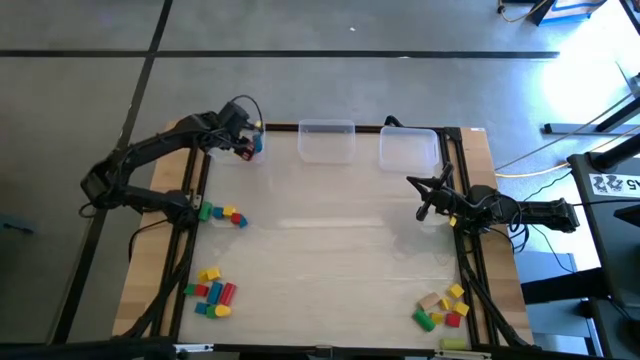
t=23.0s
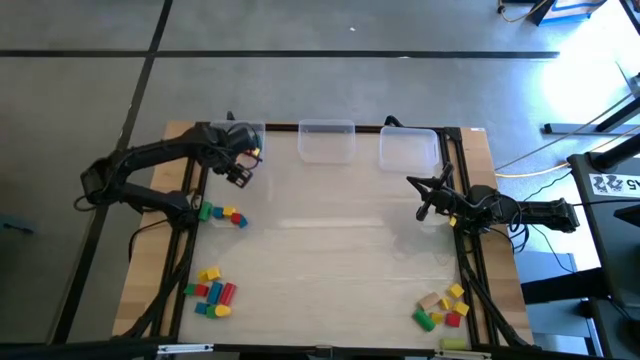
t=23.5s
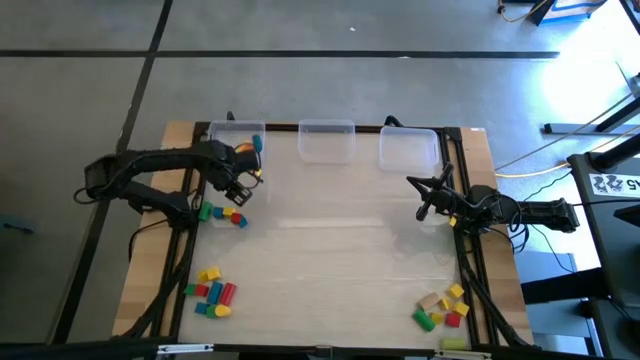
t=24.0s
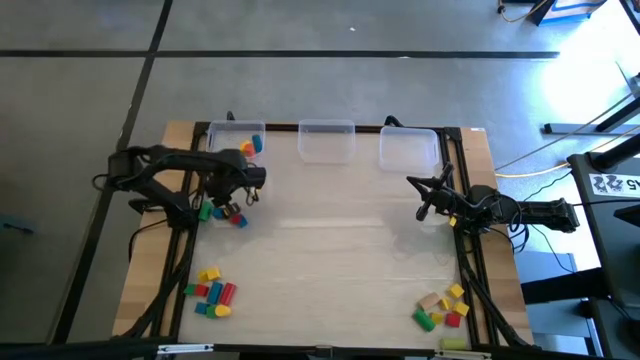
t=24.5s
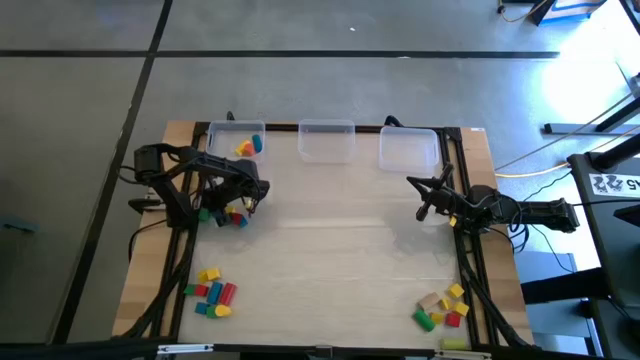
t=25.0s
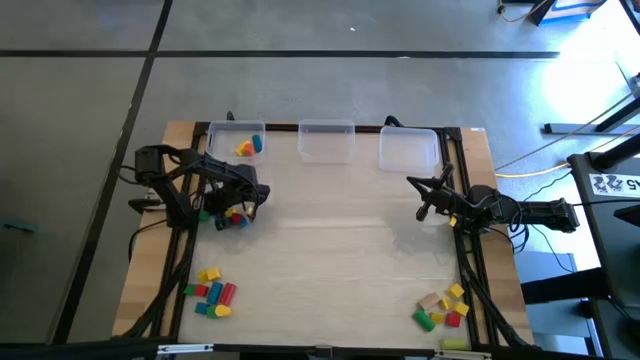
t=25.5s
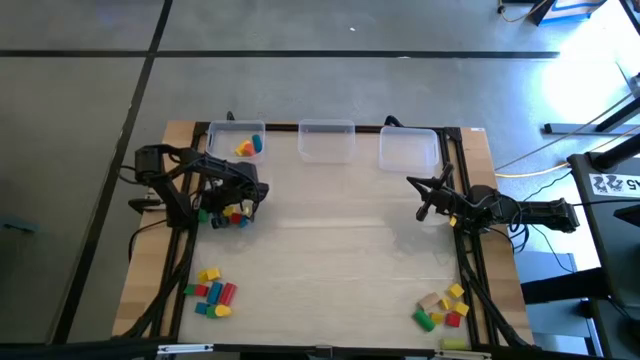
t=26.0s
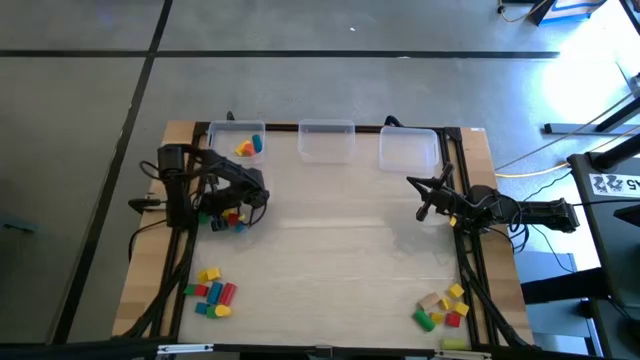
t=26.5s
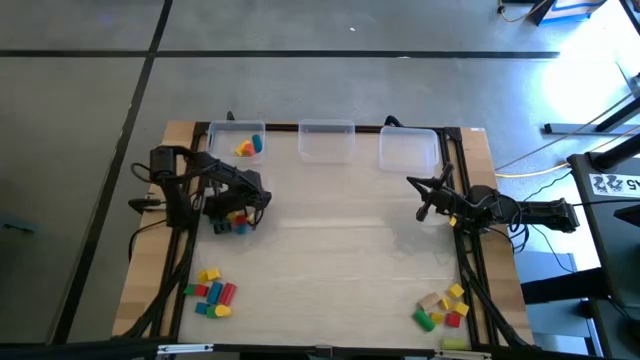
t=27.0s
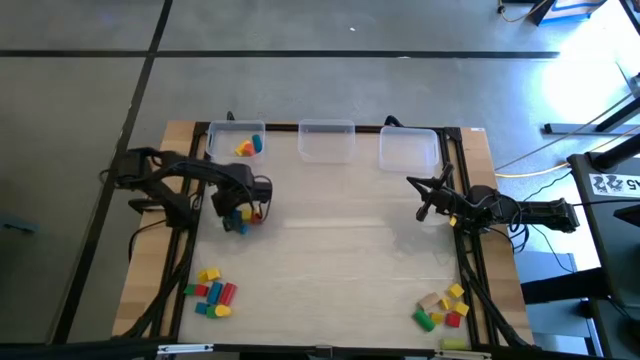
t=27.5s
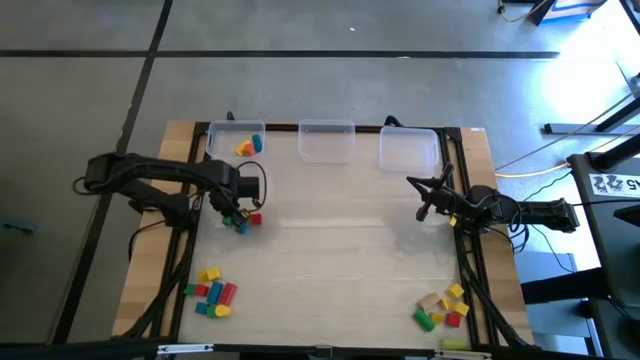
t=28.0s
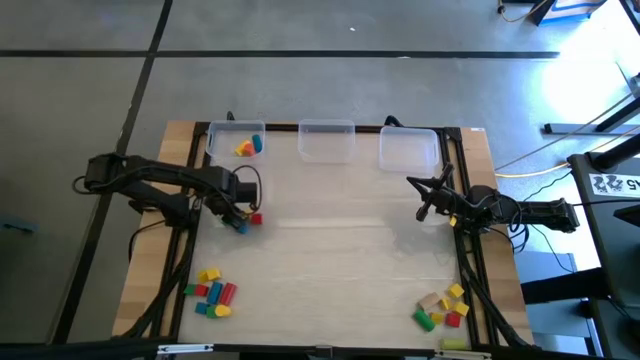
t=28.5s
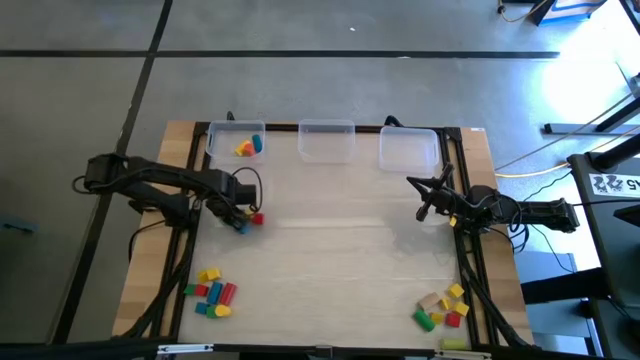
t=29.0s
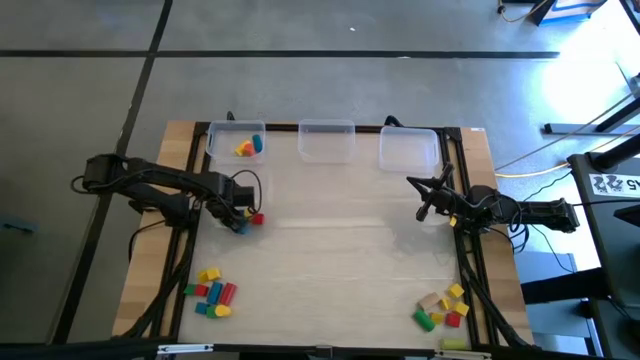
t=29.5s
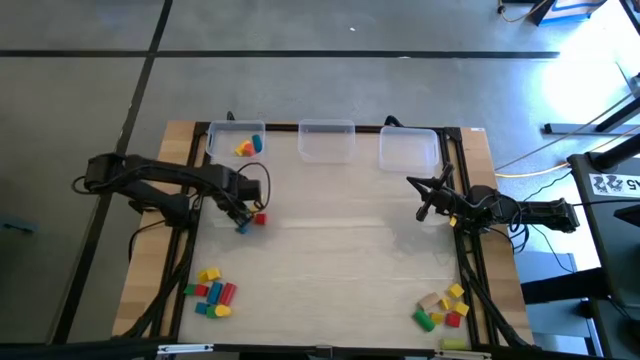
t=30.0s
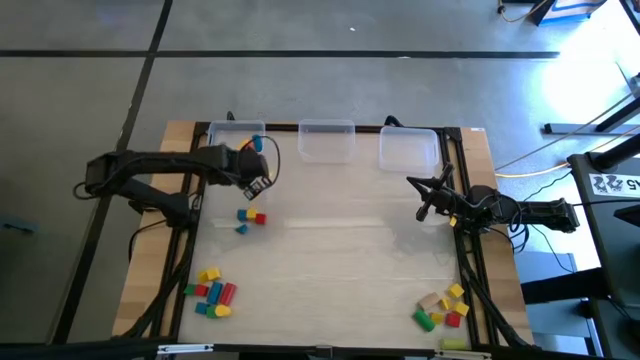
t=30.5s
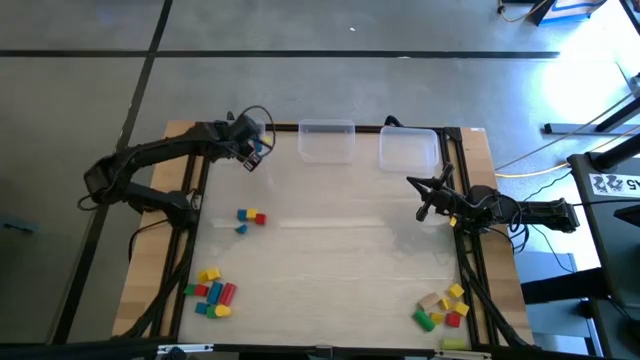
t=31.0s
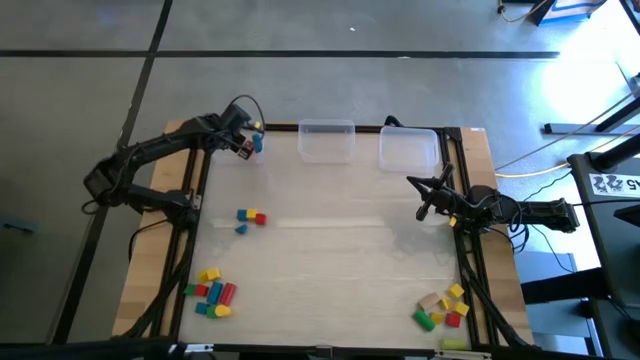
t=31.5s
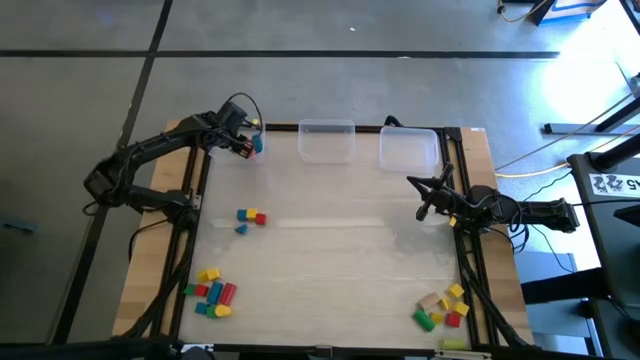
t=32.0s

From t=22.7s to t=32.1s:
Task: Sort blocks by size
Put the cylindrical green block into the left transparent bin

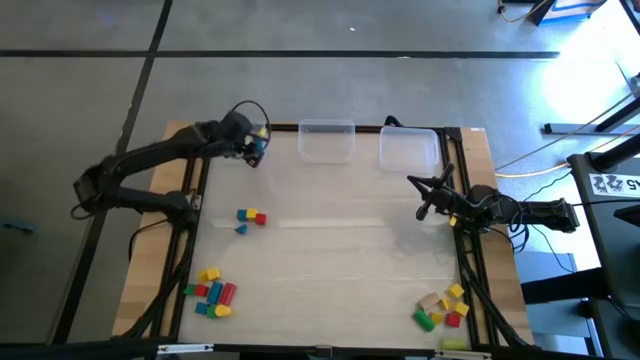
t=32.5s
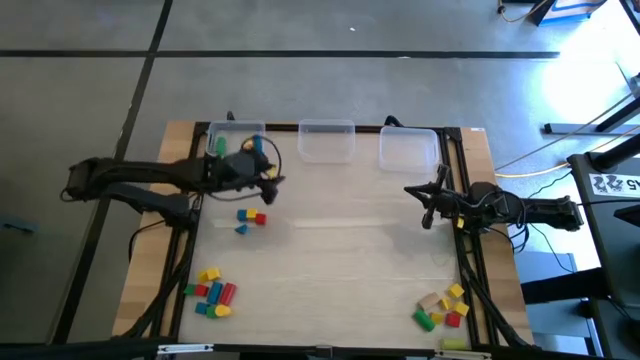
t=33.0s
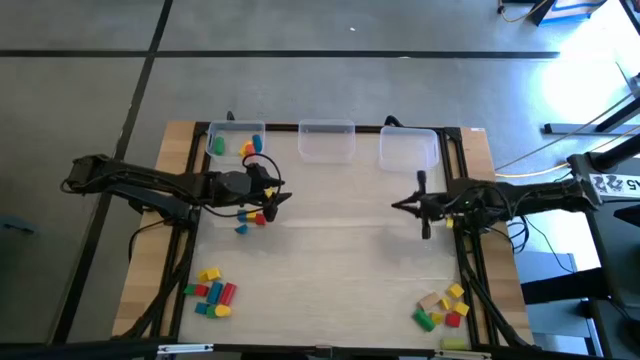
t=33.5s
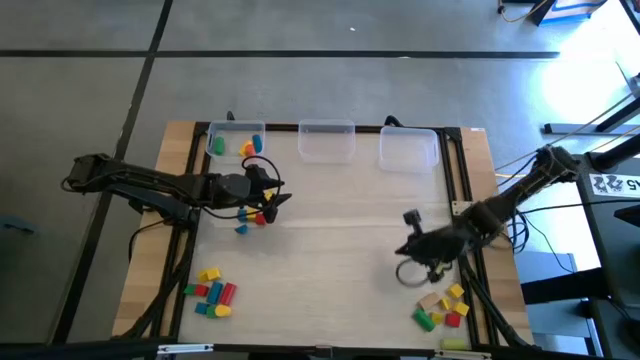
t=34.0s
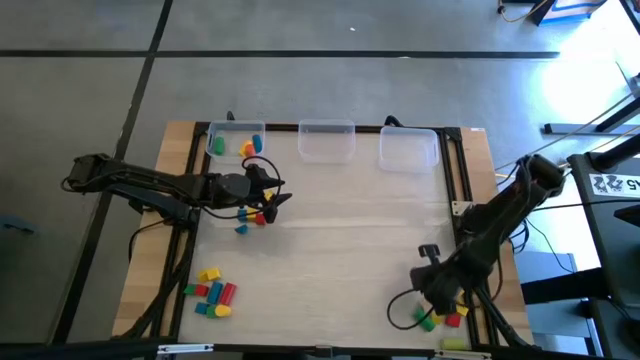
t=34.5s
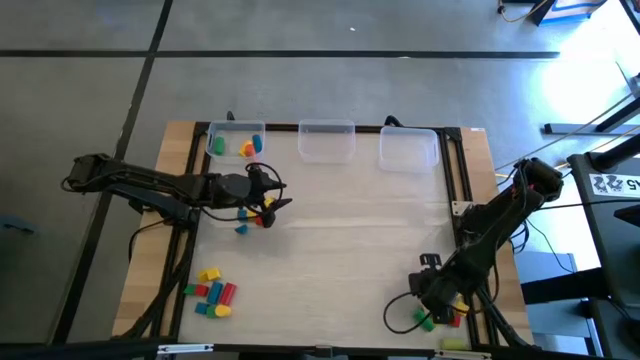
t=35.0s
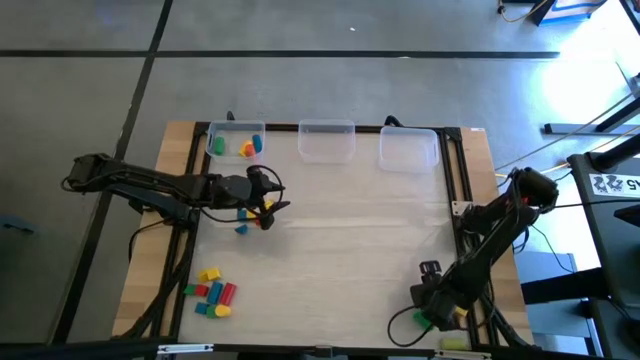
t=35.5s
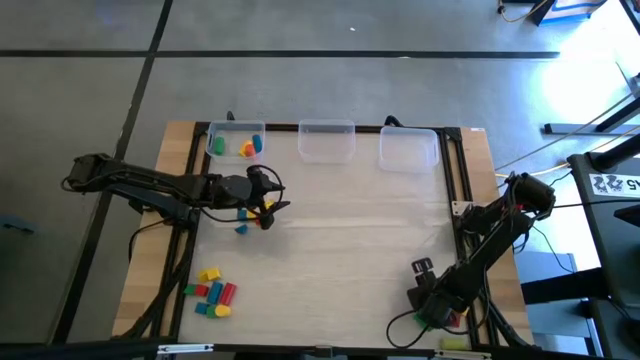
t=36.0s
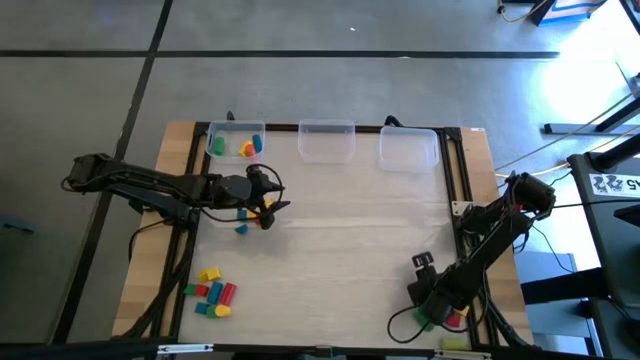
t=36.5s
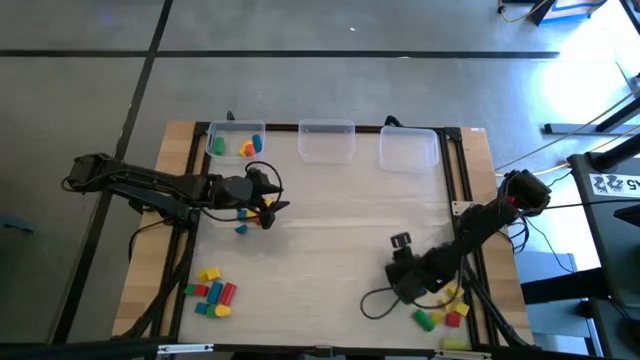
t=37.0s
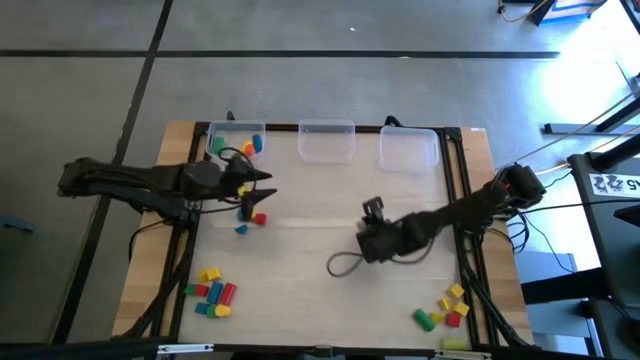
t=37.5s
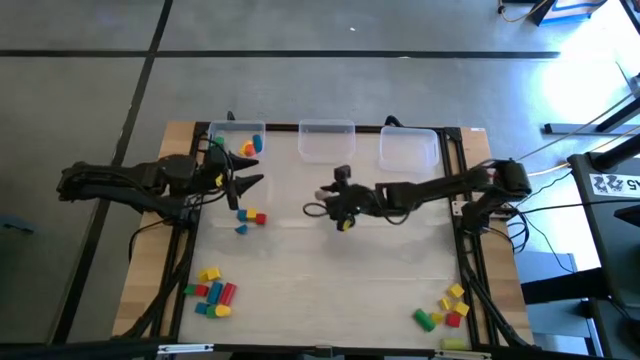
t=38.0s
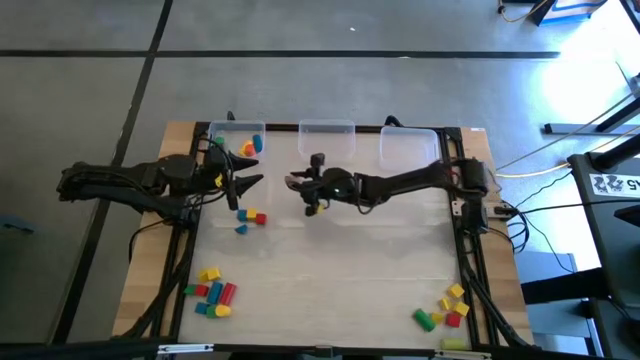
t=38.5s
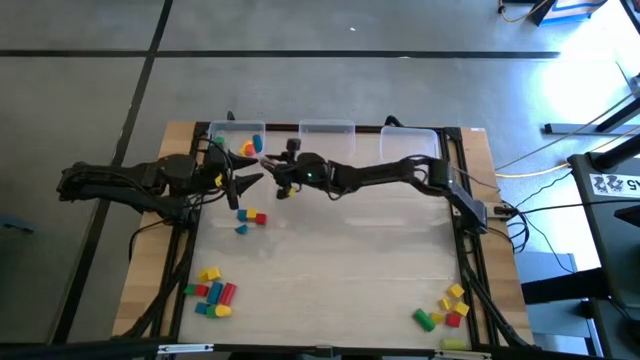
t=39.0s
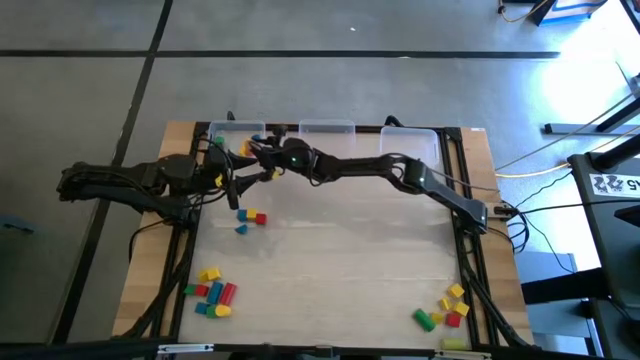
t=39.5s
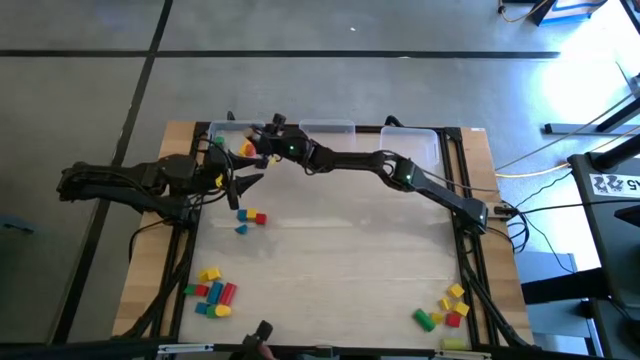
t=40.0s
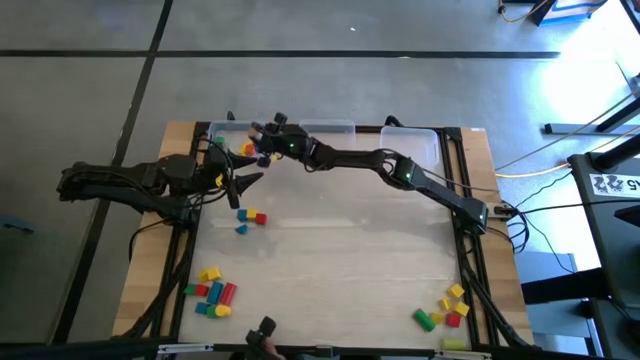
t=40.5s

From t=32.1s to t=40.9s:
Put the cylindrical brown block into the left transparent bin

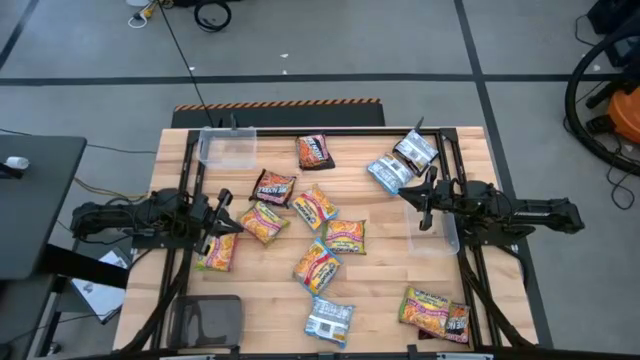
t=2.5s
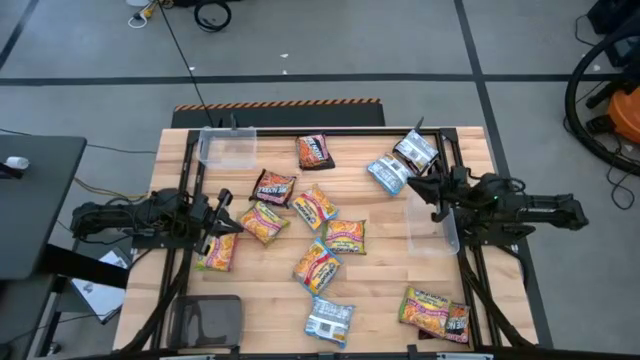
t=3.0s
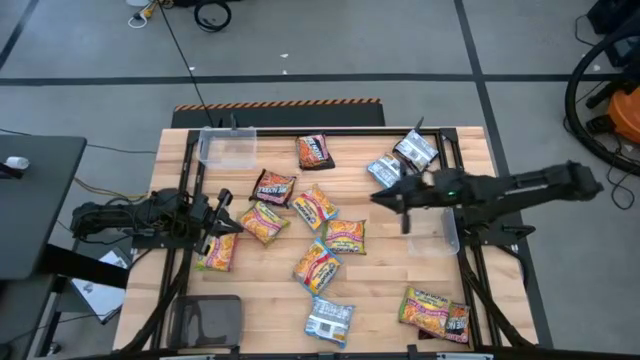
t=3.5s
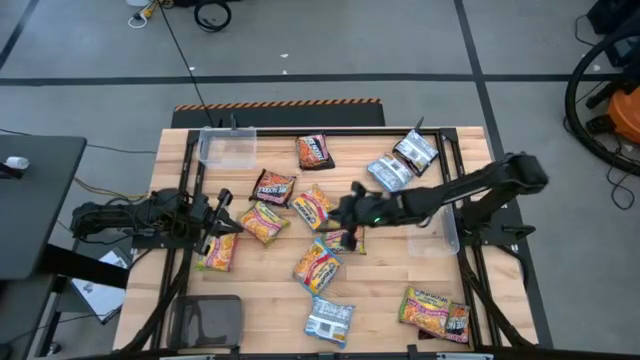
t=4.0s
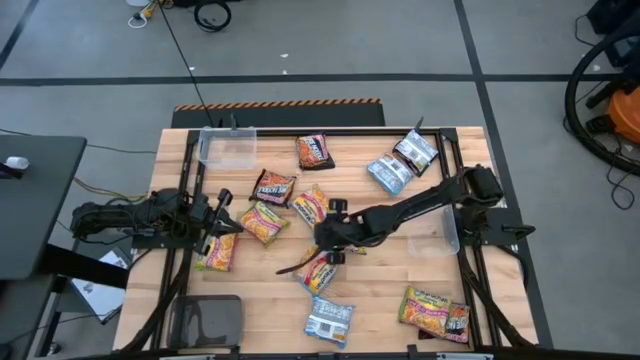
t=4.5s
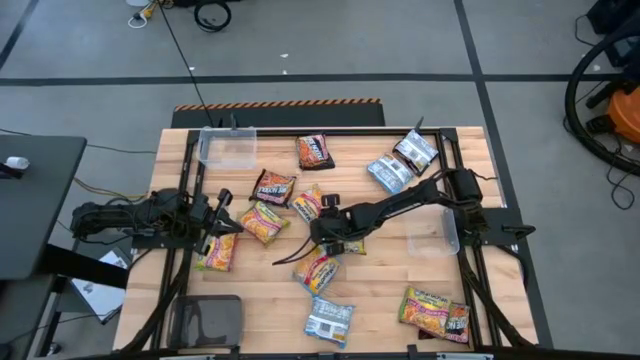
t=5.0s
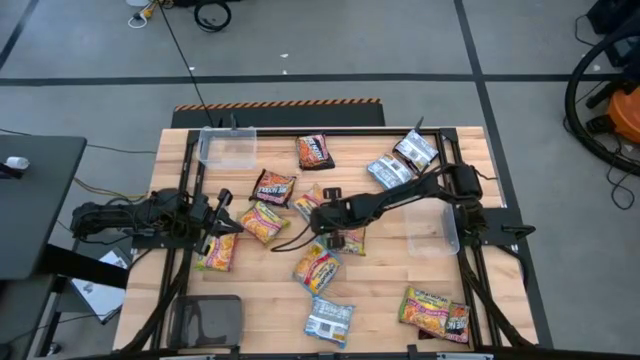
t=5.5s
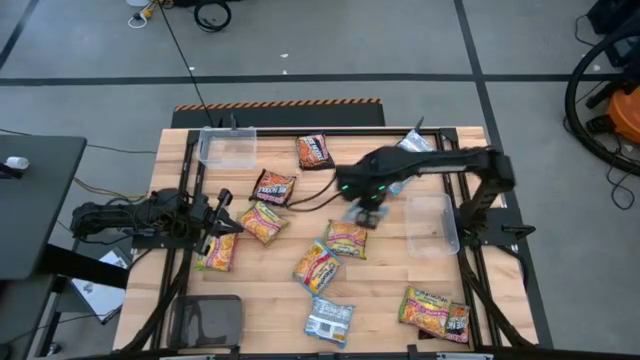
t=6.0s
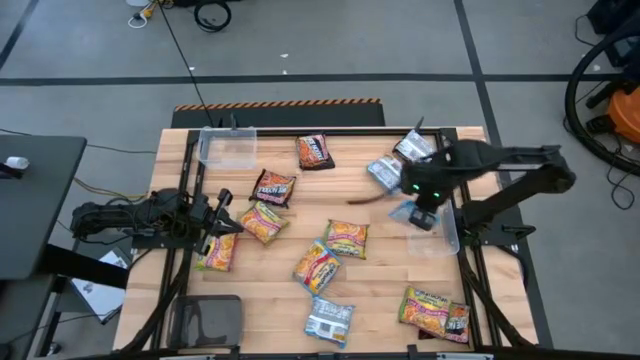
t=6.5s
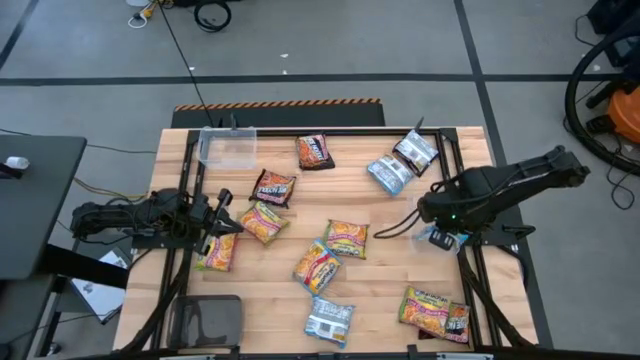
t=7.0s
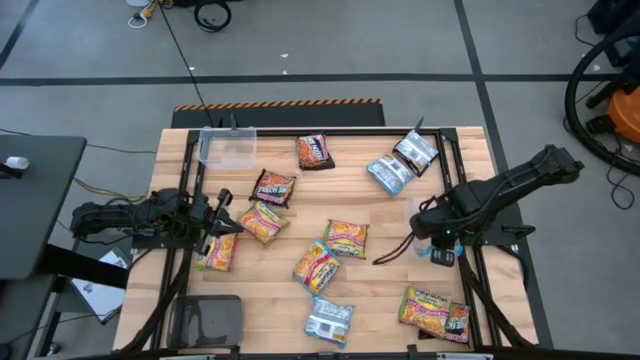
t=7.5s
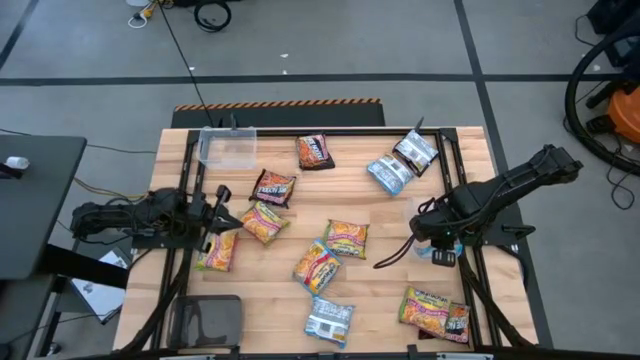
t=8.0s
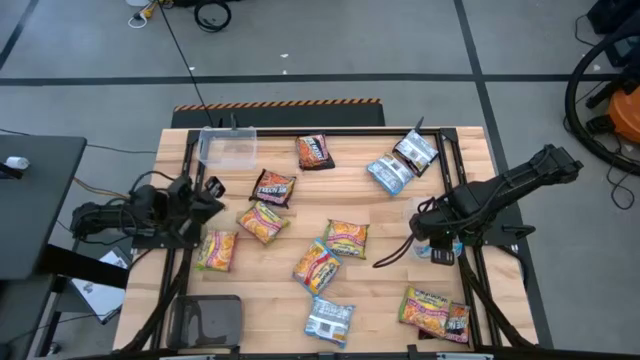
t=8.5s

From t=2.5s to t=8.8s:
Task: Sort Maruchan noodles
Put the blue noodle pack into the bottom transparent bin
